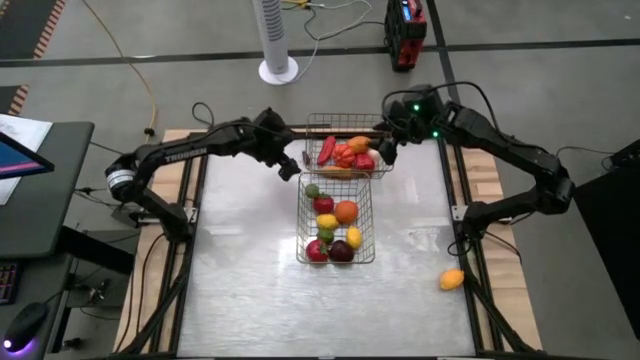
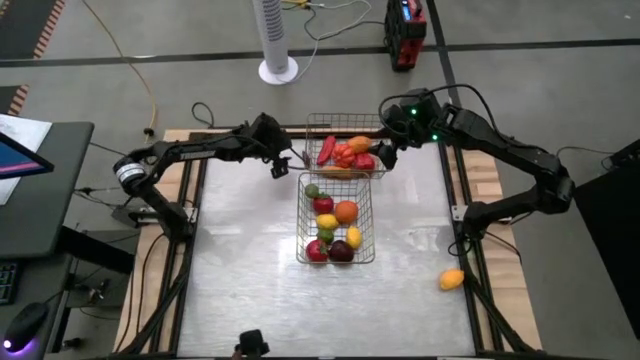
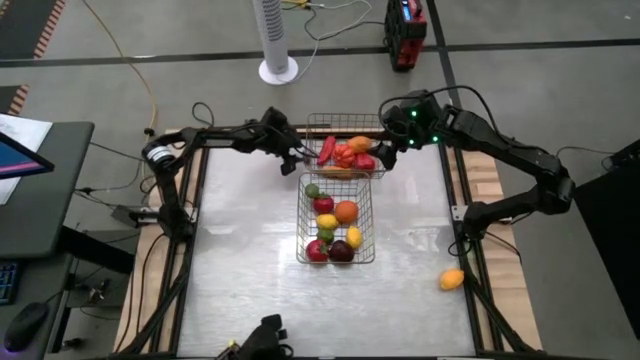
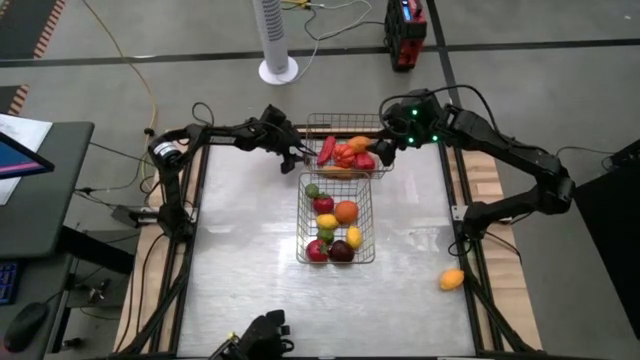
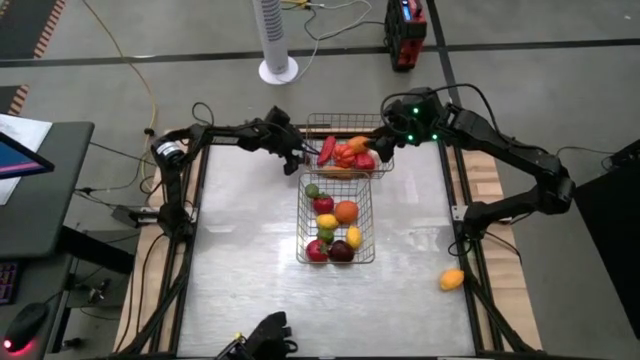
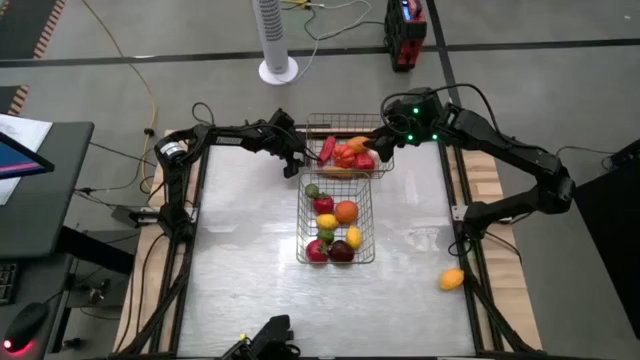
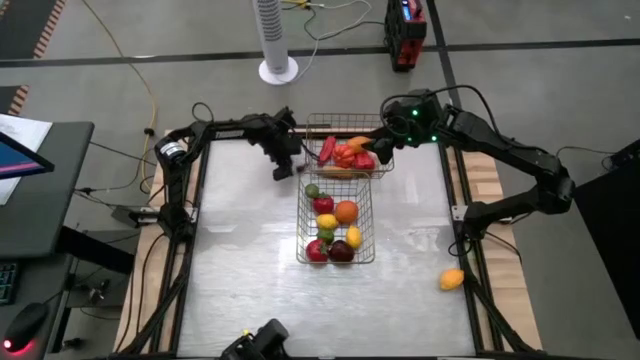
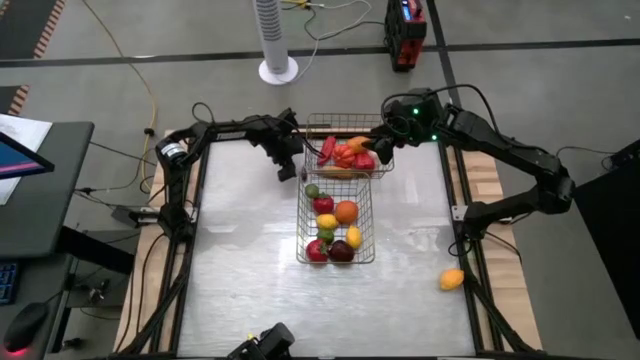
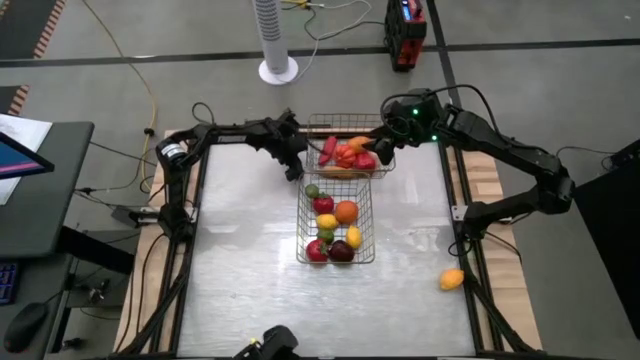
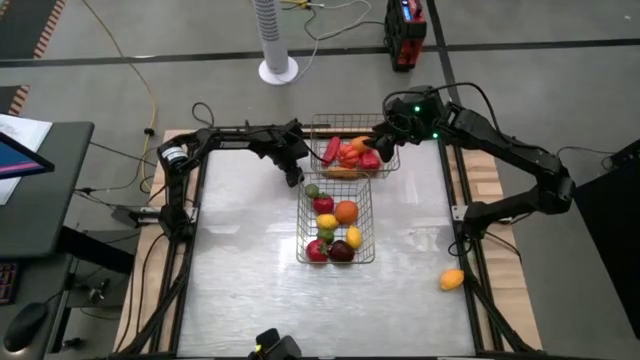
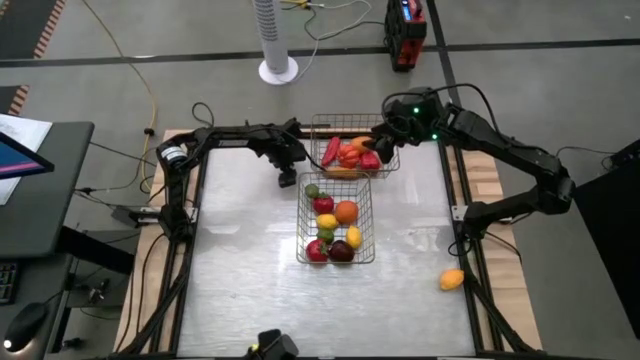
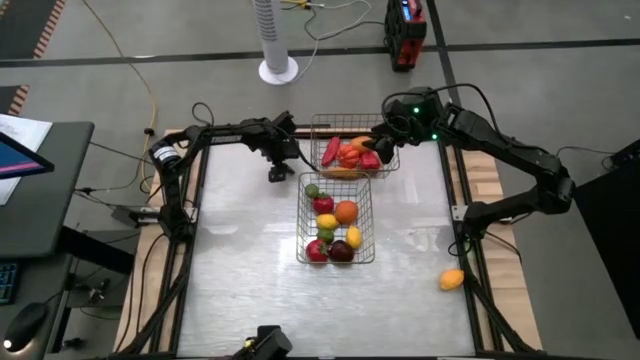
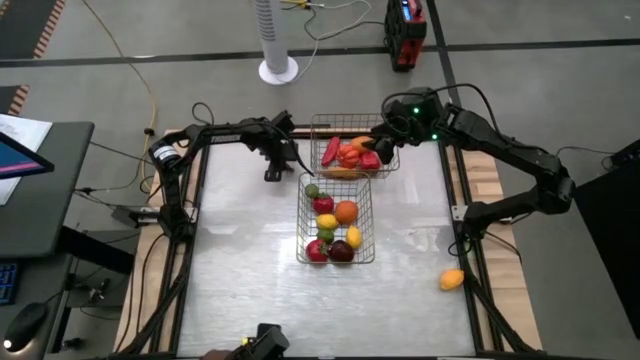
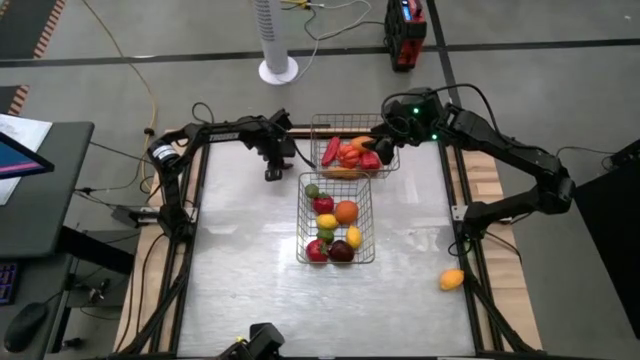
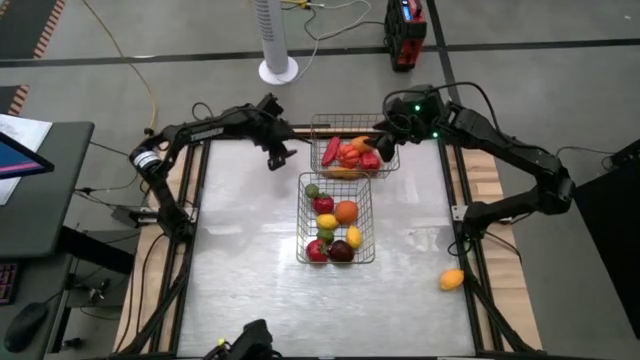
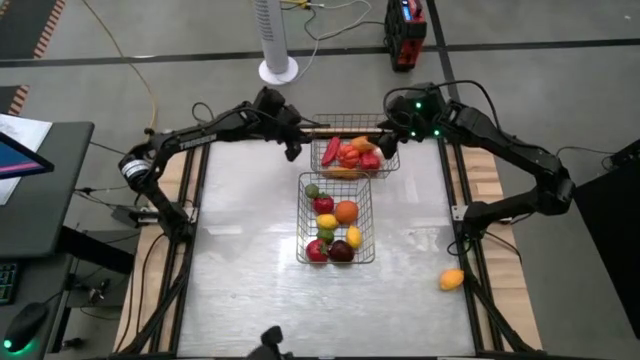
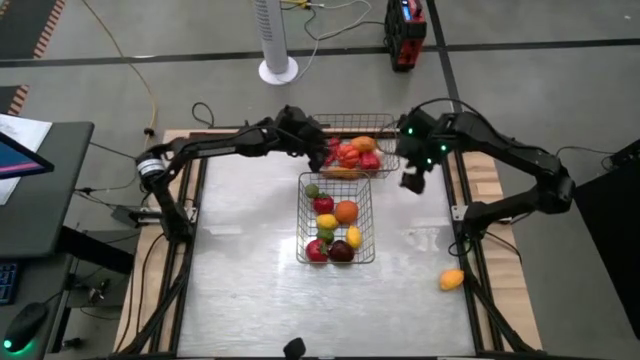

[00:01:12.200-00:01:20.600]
Task: Sort produce into baskets
Put the eggplant into the top wire basket

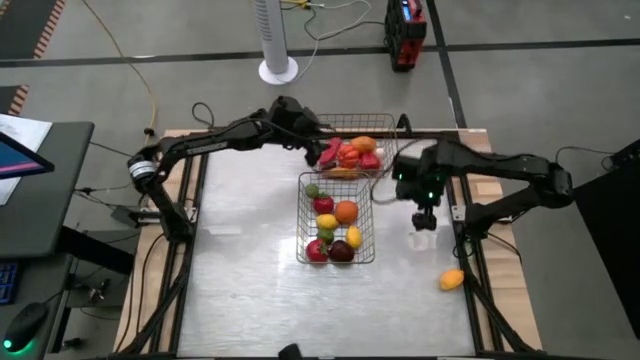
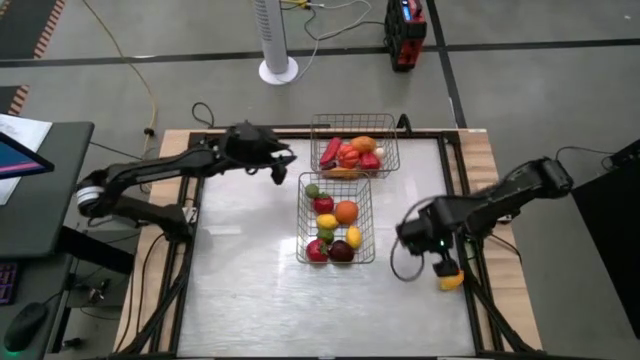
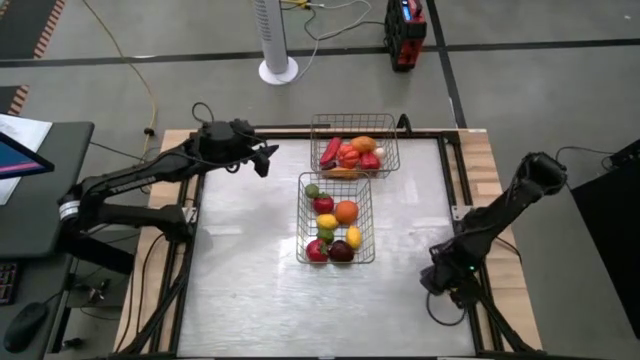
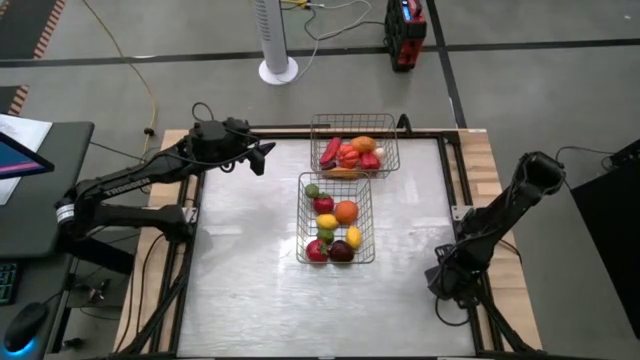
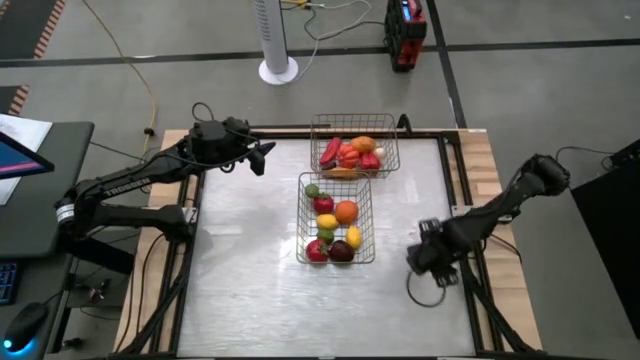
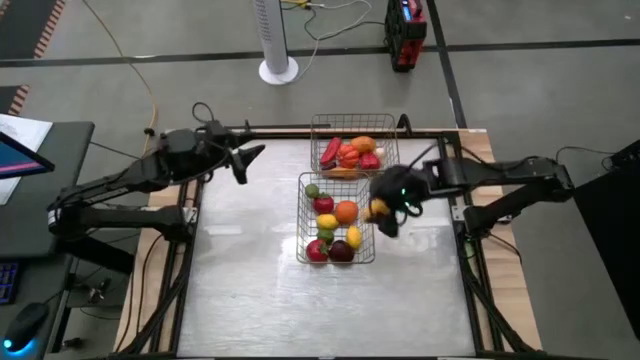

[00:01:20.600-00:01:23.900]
Put the lemon into the bottom wire basket

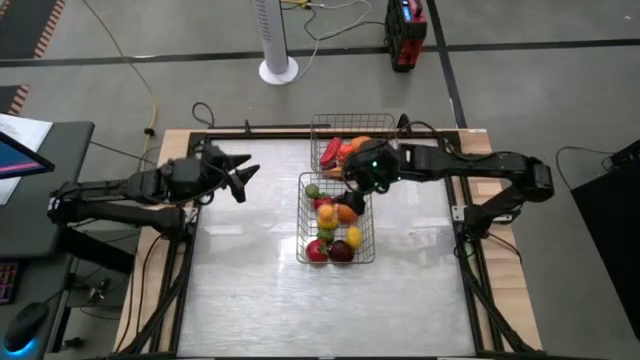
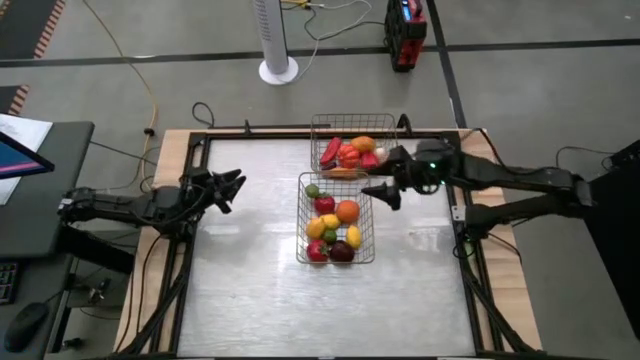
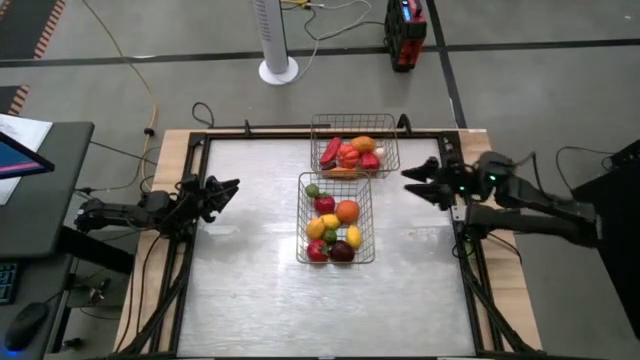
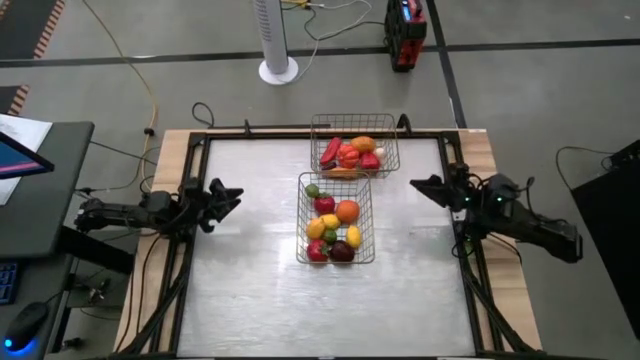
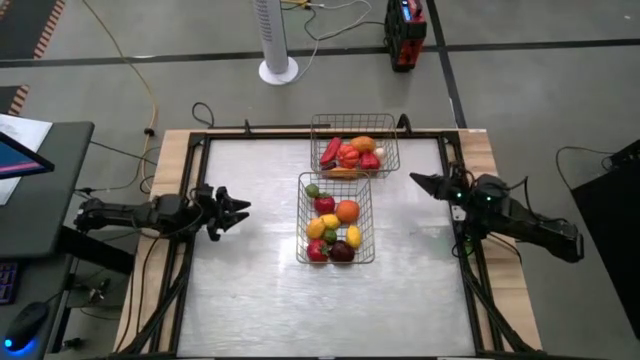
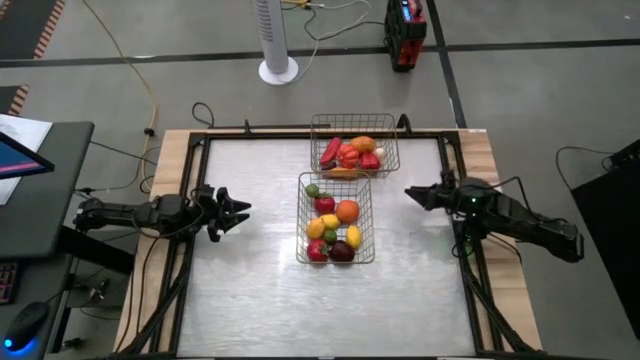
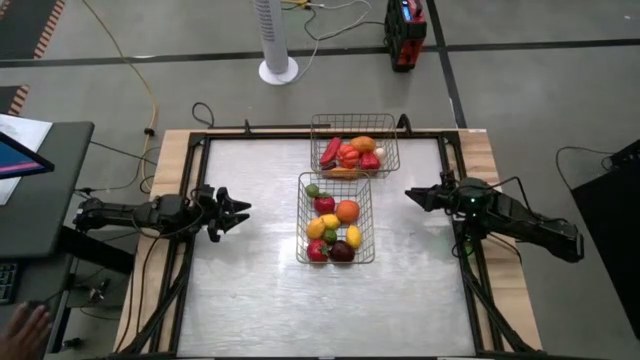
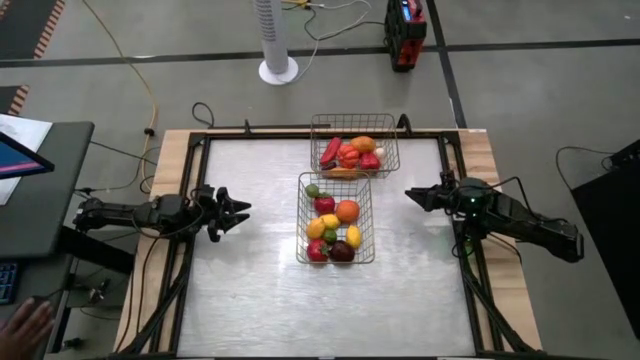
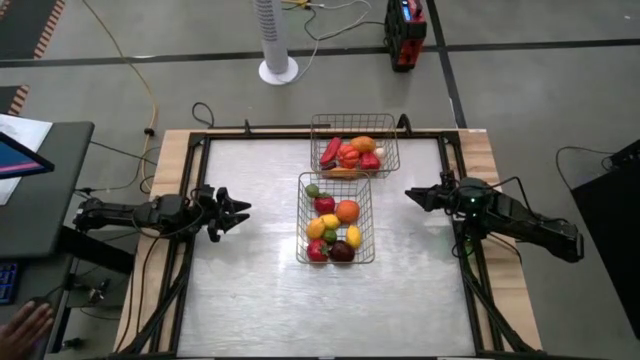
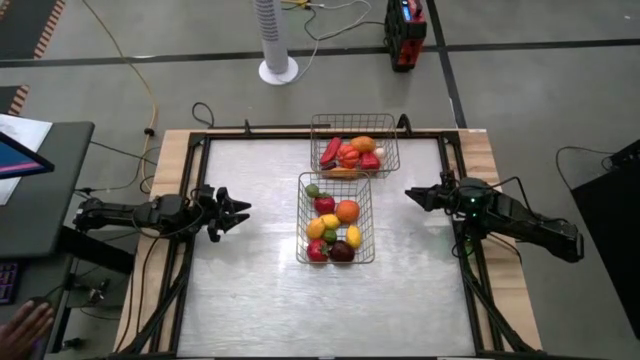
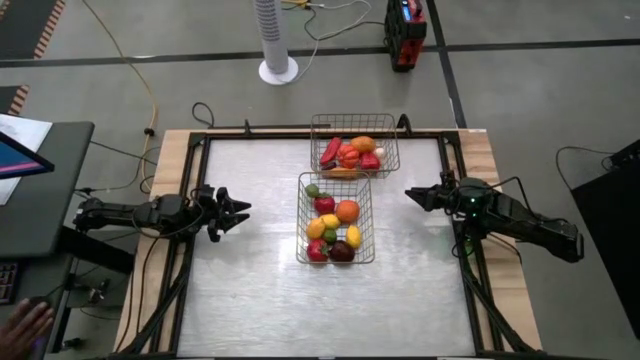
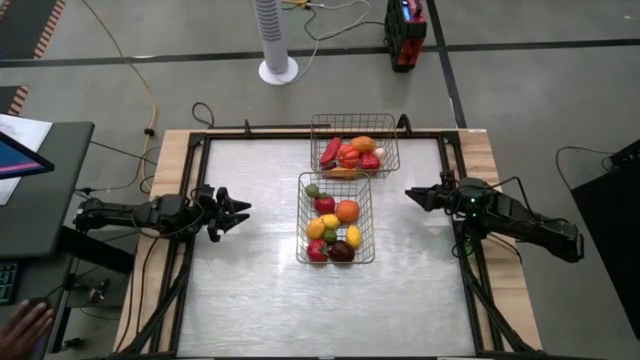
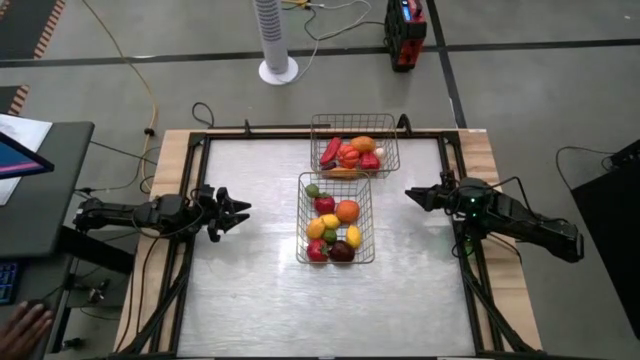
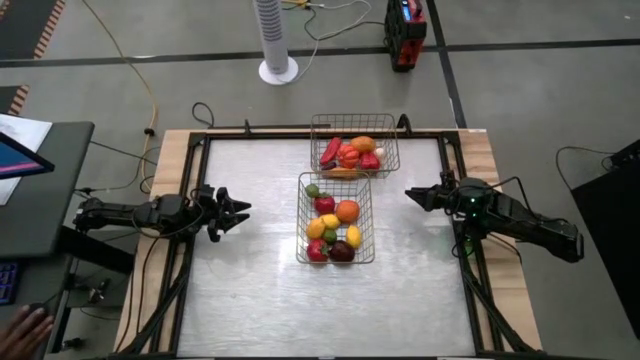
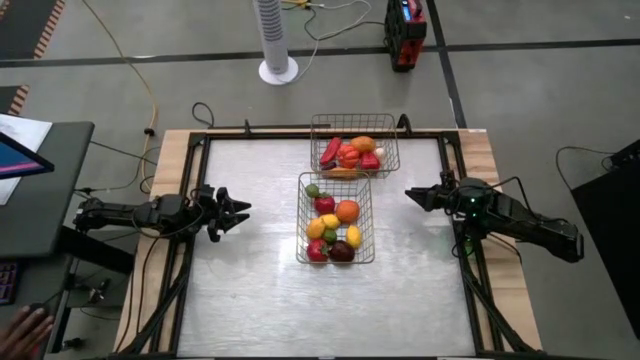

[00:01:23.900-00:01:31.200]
Return to Home Position

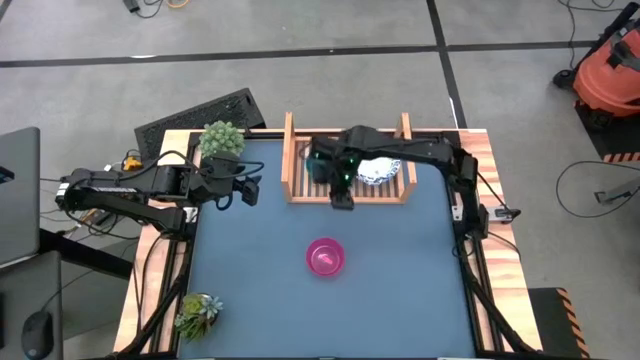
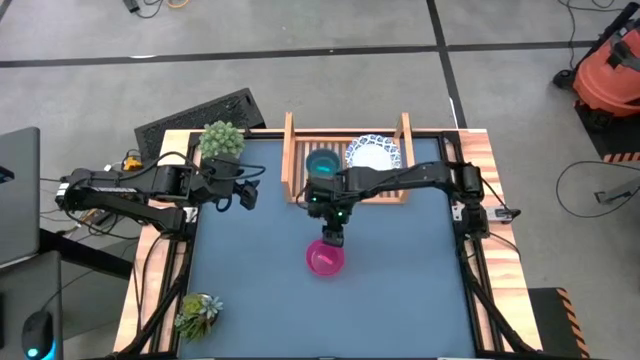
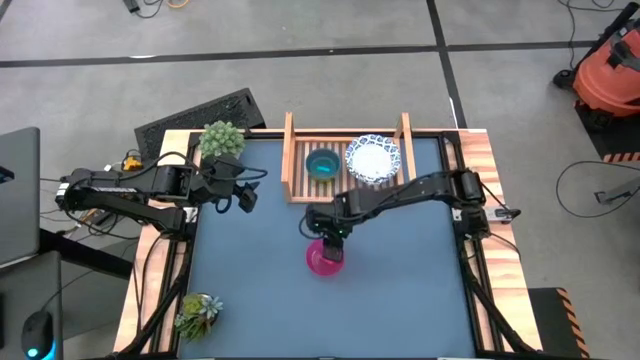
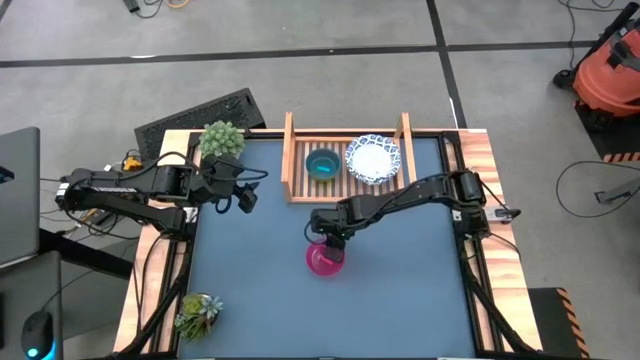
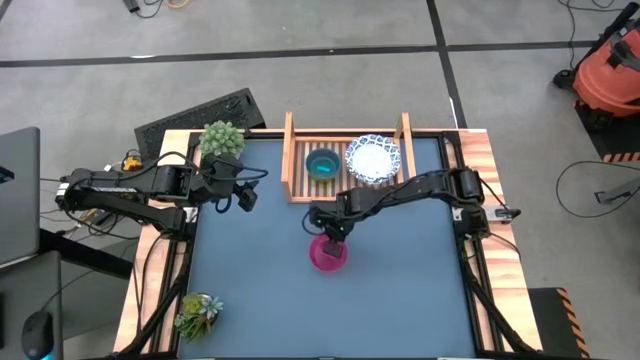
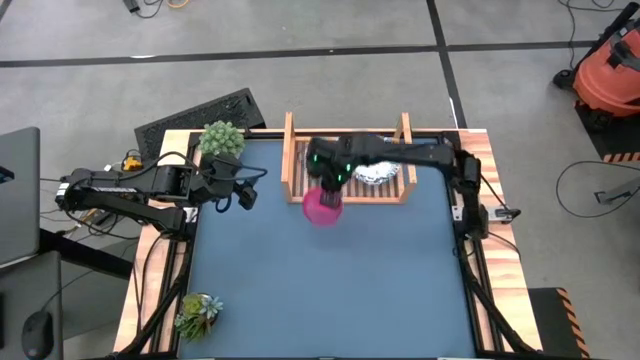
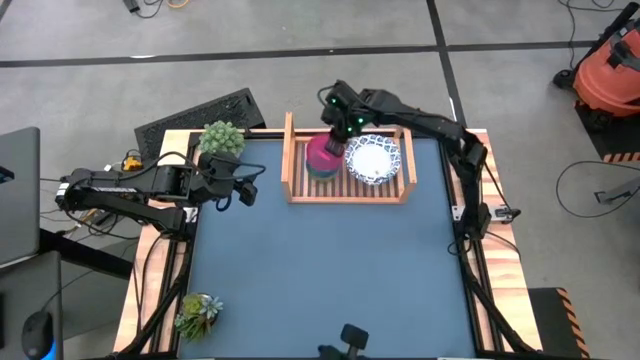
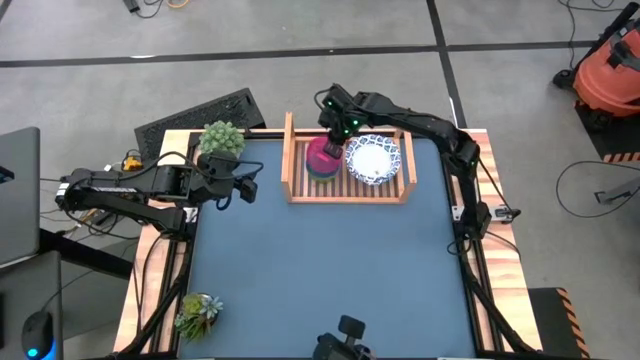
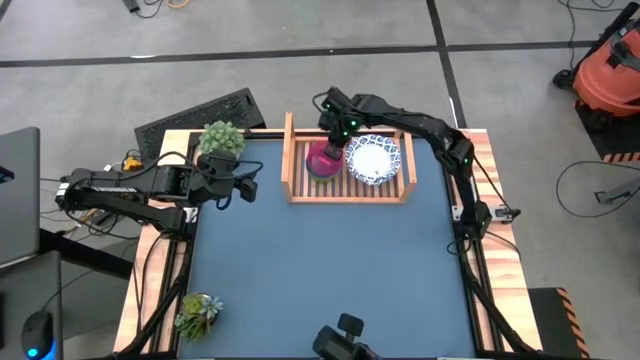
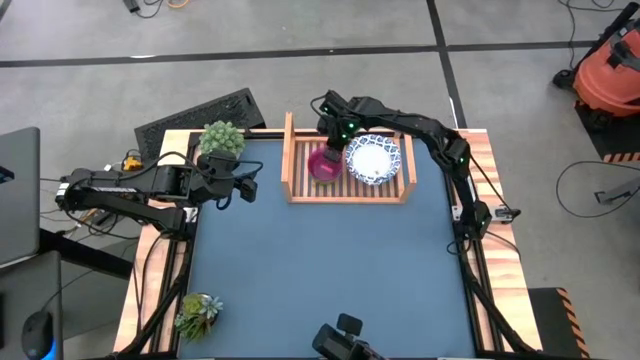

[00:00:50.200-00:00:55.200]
Task: Place and stack bowls onto a shelf
Stack the pink bowl on top of the blue bowl on the shelf
